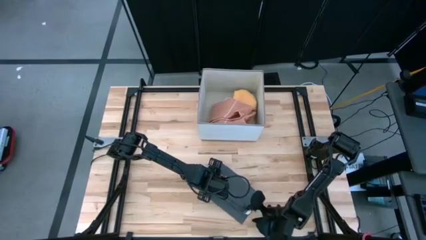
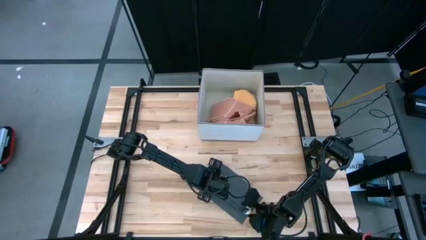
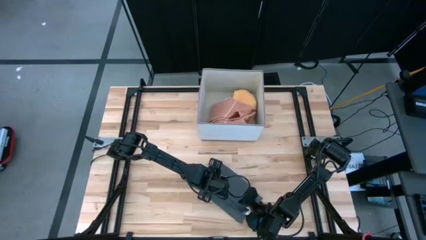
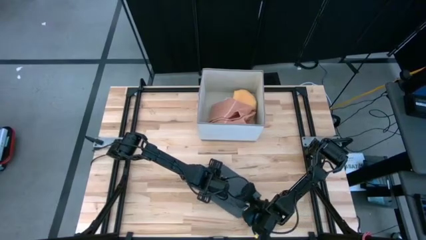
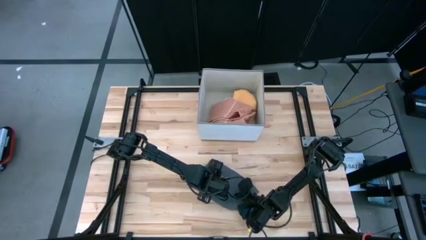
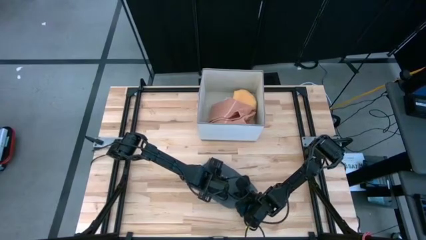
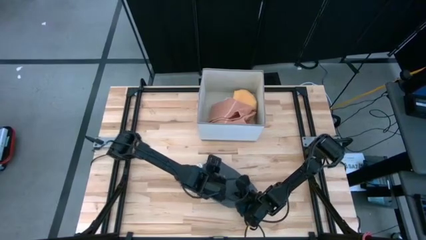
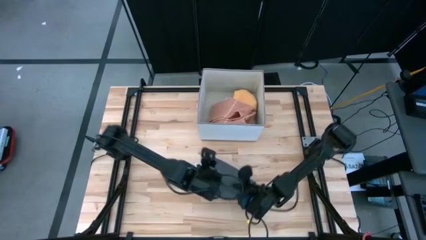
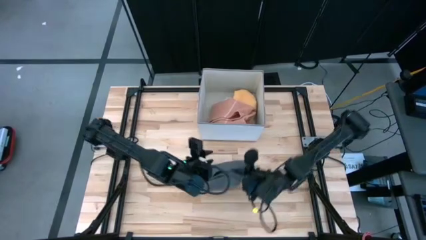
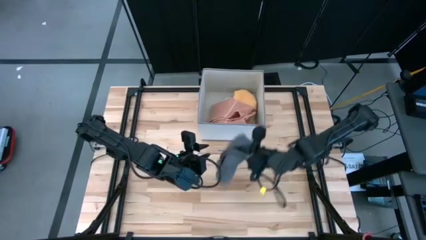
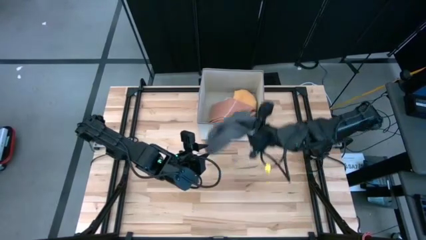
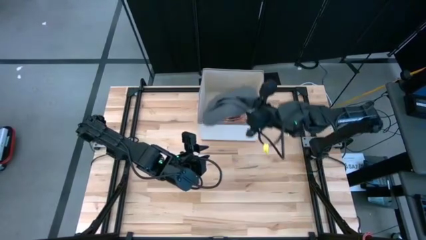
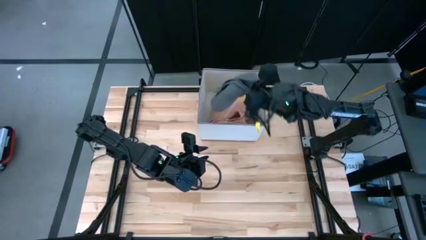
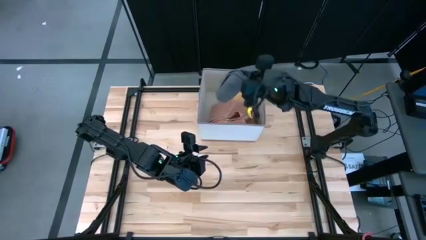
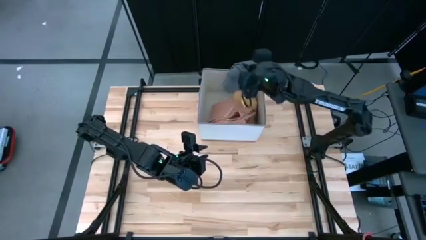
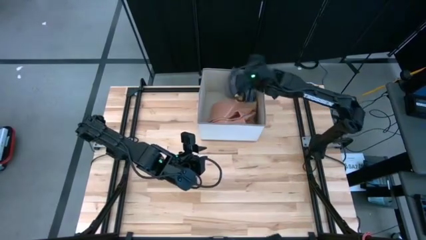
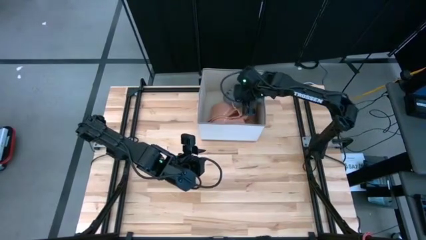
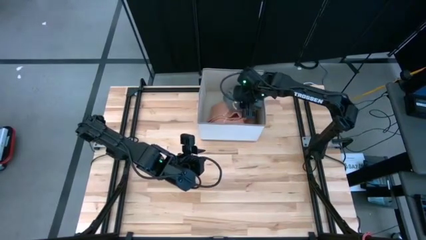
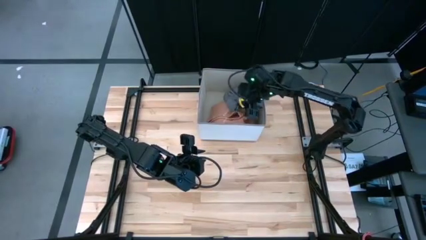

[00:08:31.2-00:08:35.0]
Task: Fold towel
Put the folded dark gray towel into the laundry organizer

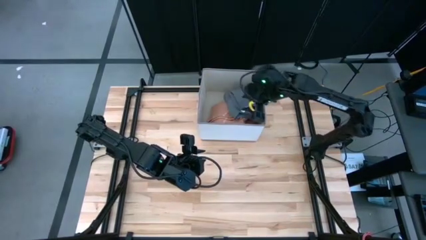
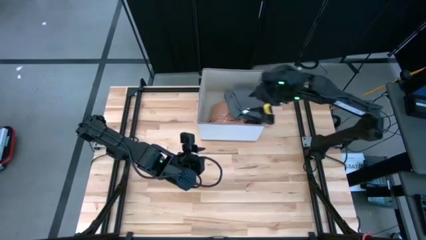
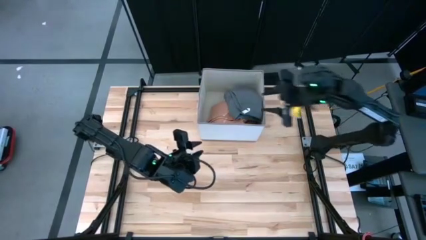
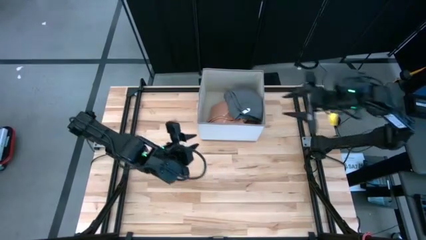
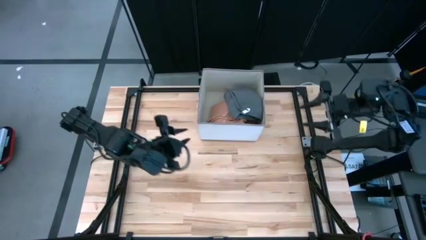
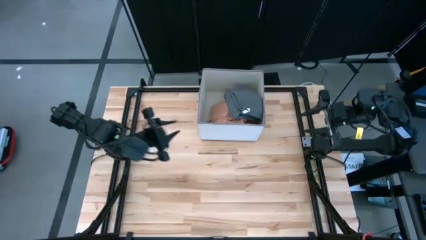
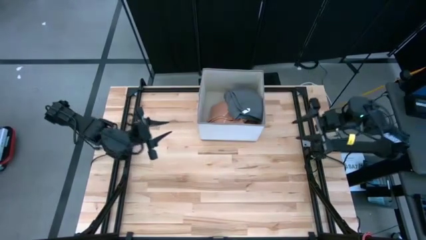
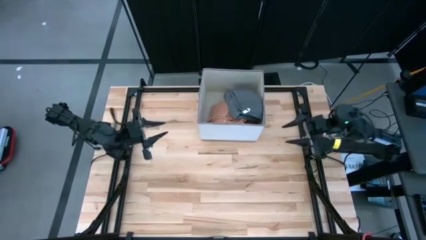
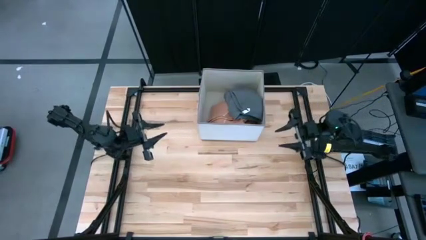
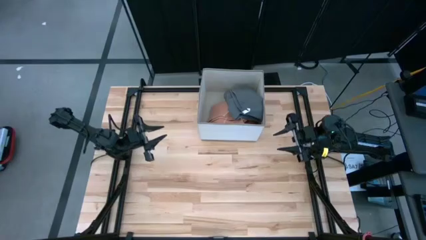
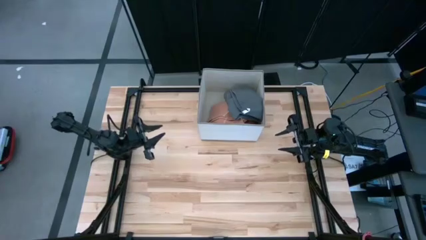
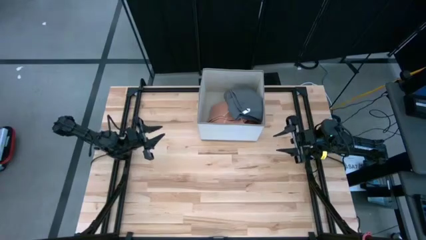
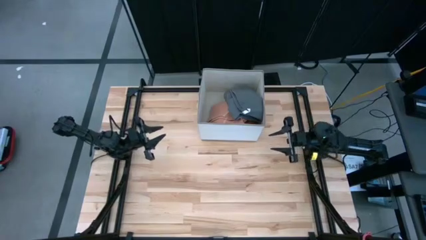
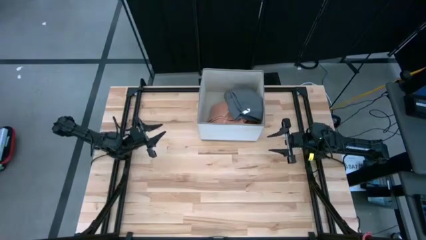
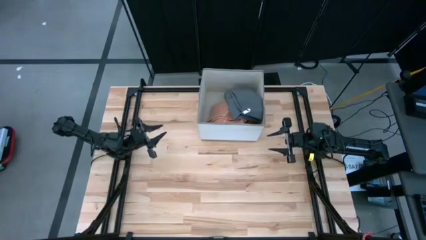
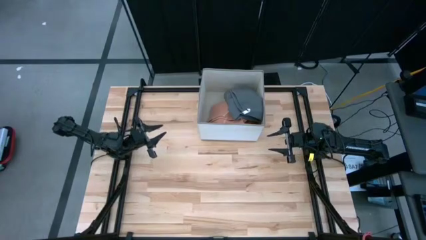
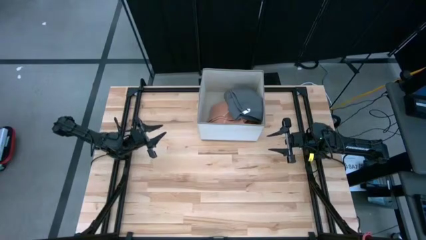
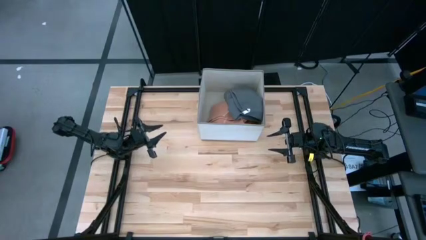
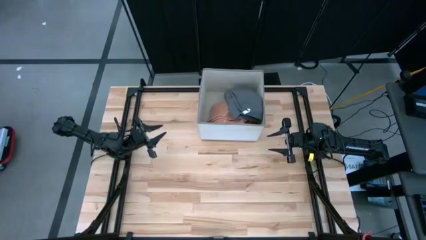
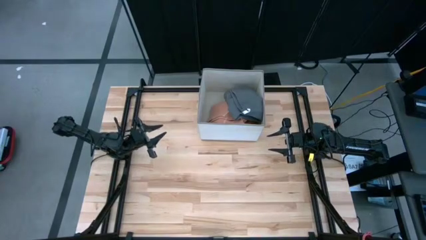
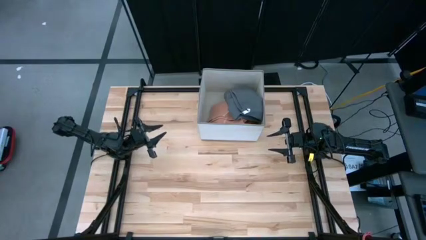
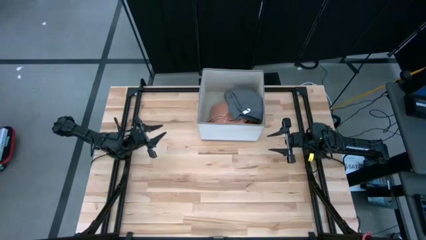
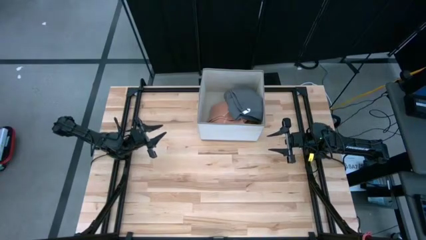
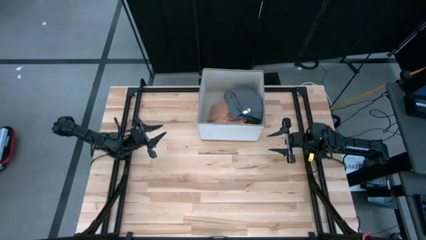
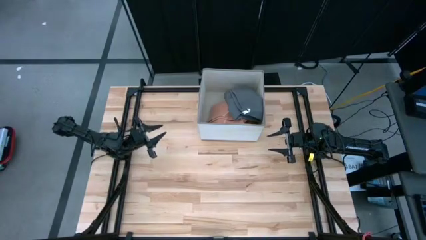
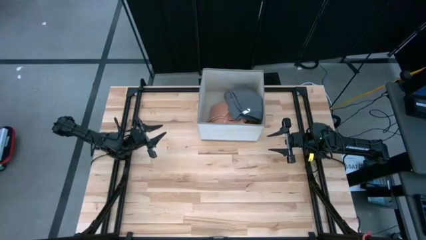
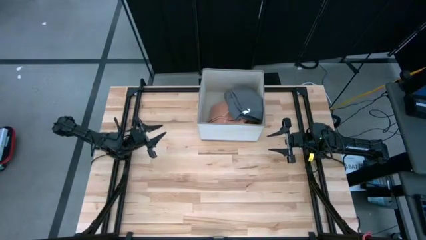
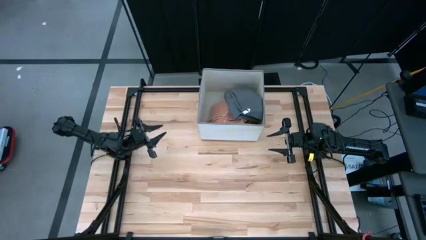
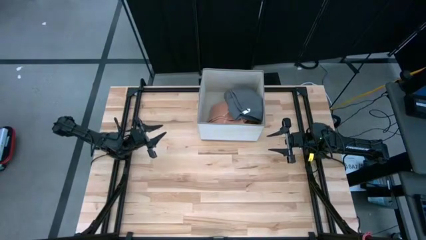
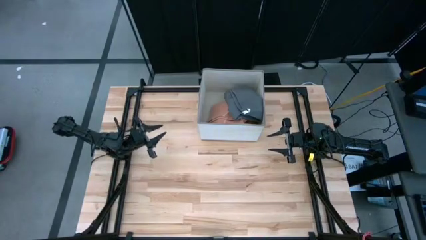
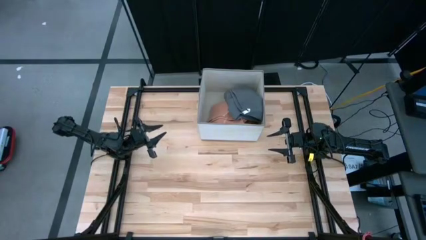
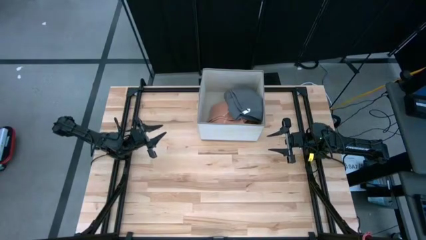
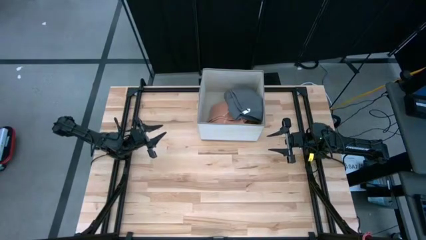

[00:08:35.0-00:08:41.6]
Return to Home Position
